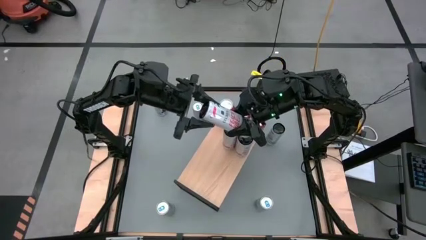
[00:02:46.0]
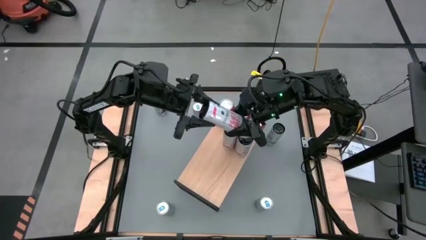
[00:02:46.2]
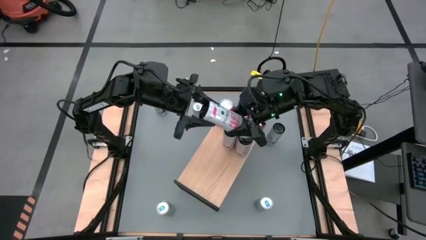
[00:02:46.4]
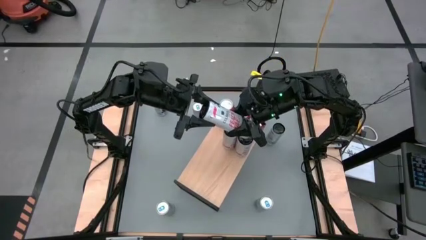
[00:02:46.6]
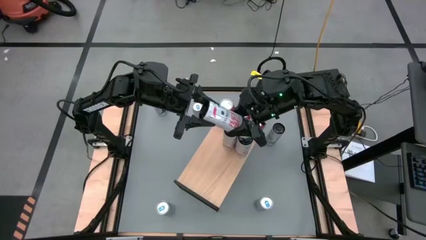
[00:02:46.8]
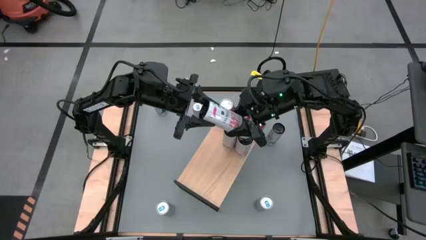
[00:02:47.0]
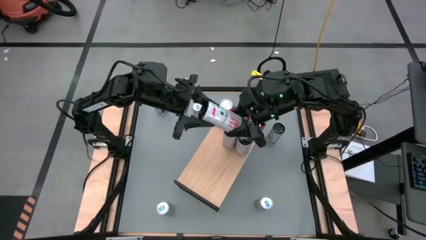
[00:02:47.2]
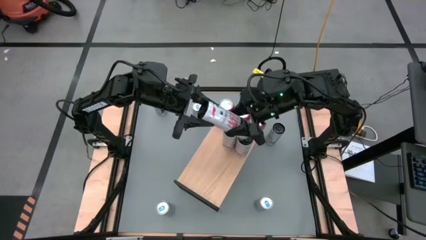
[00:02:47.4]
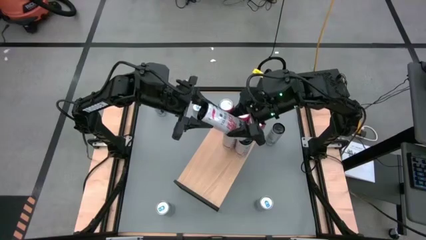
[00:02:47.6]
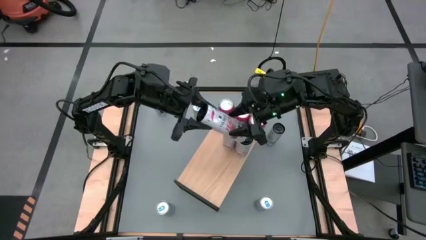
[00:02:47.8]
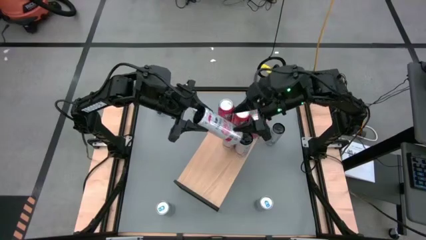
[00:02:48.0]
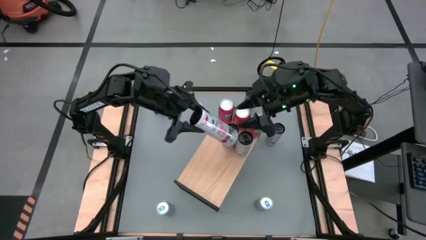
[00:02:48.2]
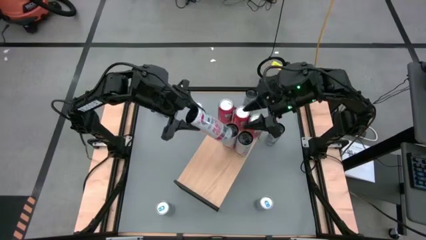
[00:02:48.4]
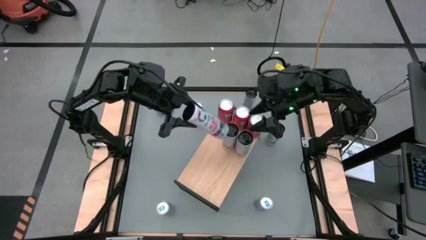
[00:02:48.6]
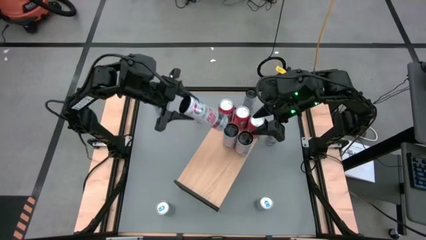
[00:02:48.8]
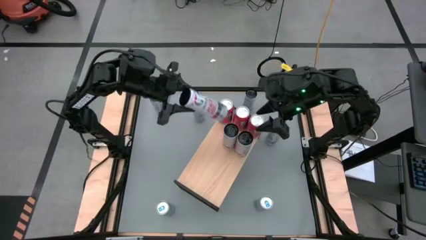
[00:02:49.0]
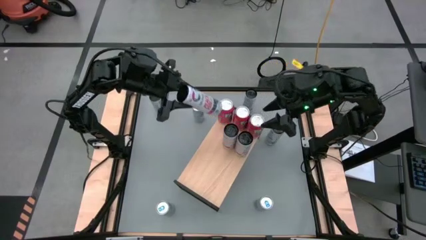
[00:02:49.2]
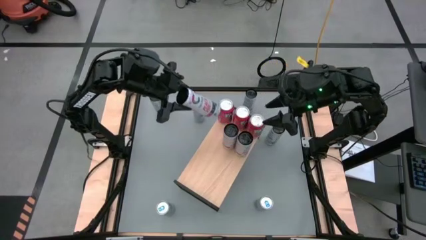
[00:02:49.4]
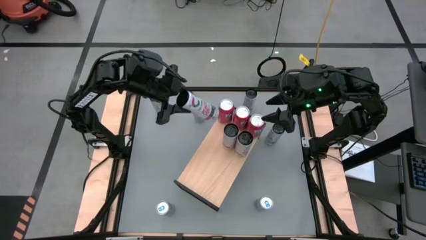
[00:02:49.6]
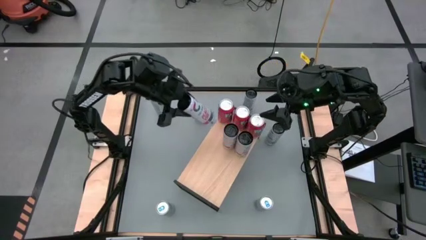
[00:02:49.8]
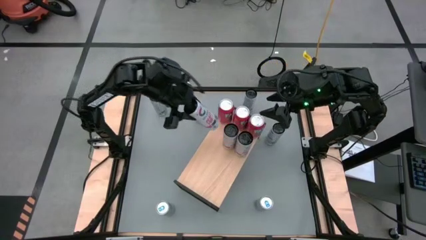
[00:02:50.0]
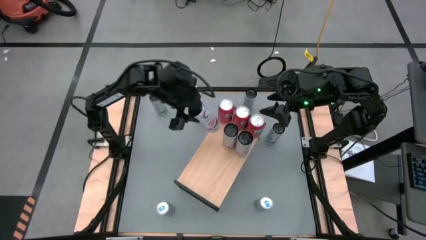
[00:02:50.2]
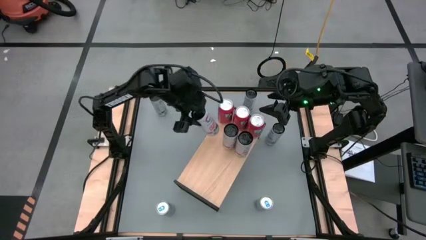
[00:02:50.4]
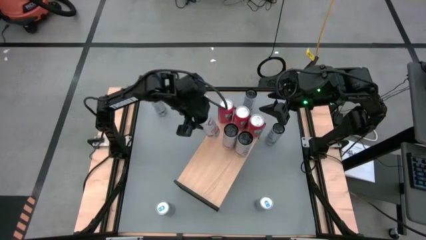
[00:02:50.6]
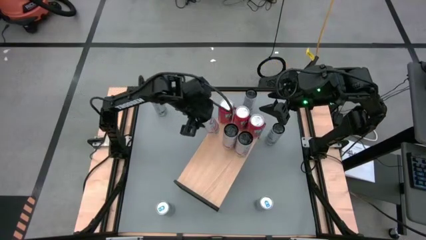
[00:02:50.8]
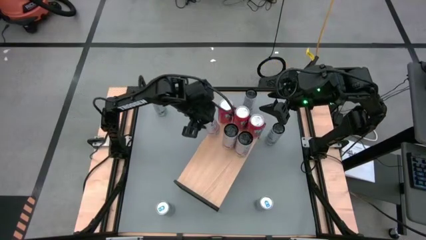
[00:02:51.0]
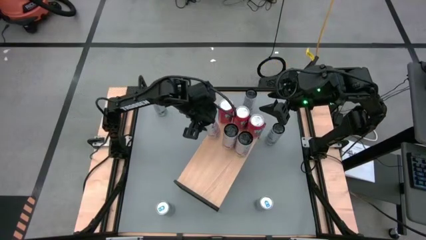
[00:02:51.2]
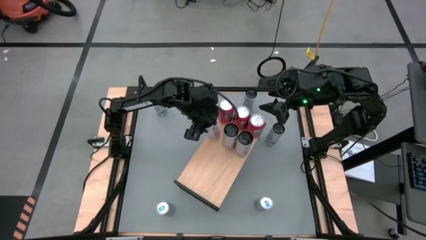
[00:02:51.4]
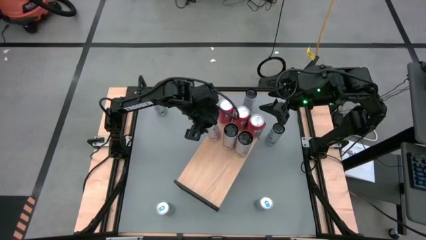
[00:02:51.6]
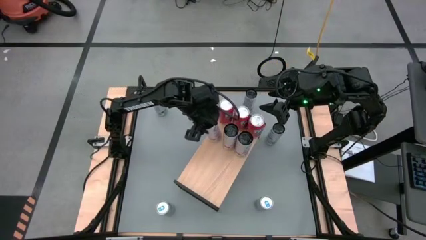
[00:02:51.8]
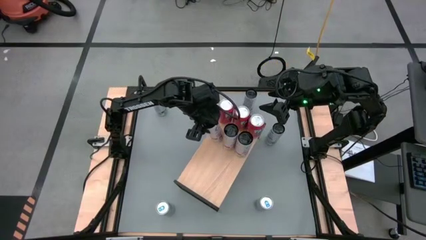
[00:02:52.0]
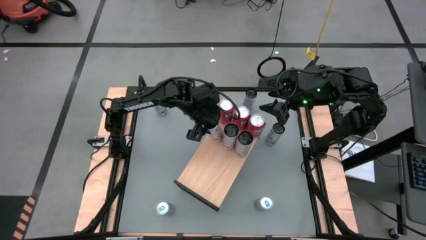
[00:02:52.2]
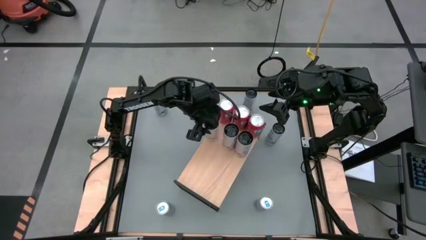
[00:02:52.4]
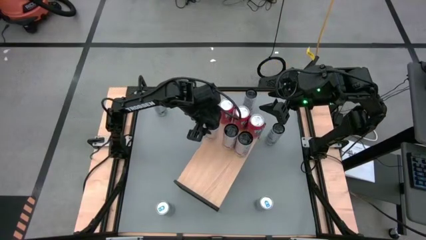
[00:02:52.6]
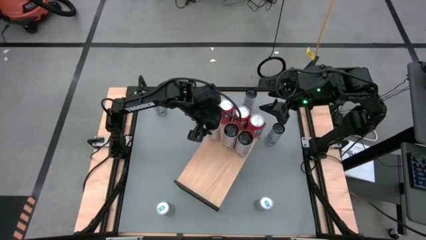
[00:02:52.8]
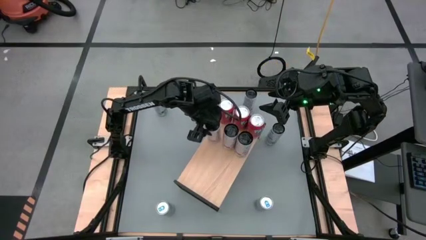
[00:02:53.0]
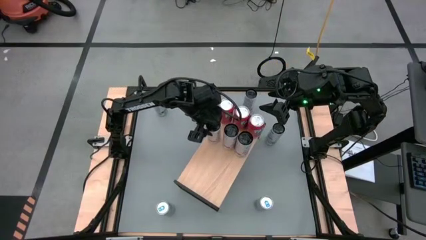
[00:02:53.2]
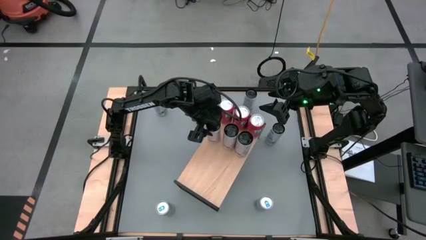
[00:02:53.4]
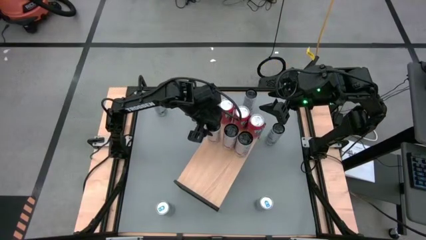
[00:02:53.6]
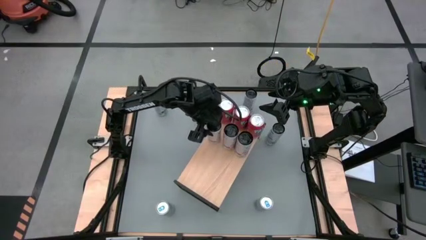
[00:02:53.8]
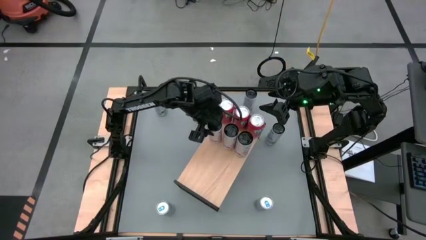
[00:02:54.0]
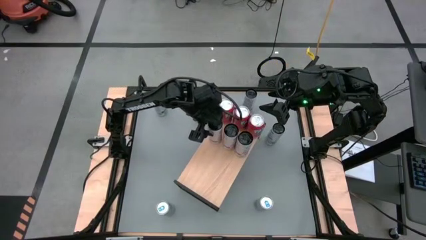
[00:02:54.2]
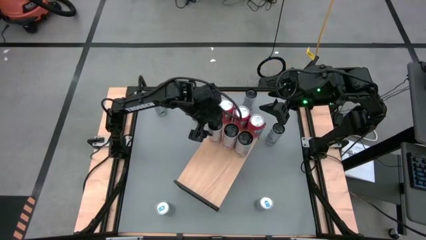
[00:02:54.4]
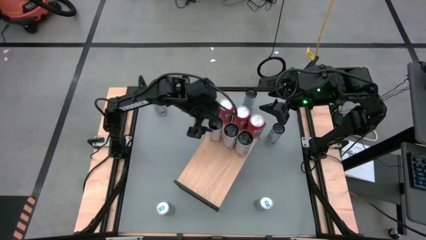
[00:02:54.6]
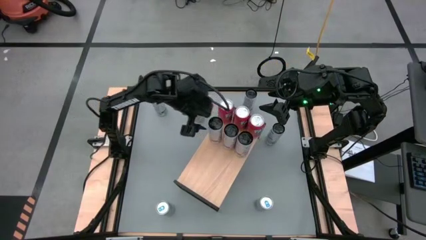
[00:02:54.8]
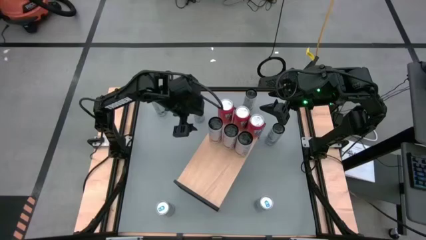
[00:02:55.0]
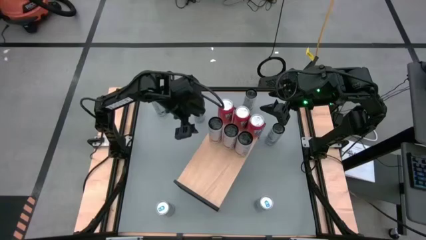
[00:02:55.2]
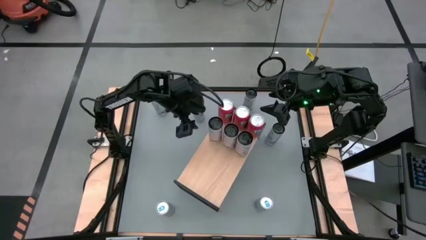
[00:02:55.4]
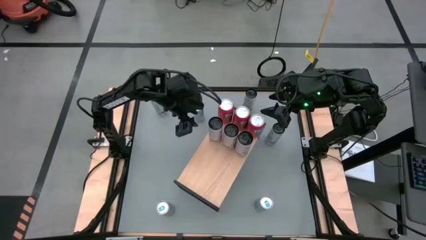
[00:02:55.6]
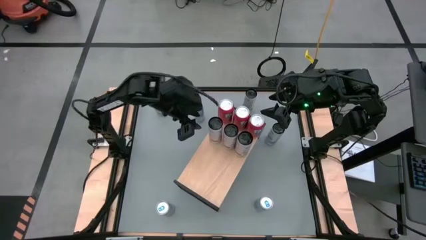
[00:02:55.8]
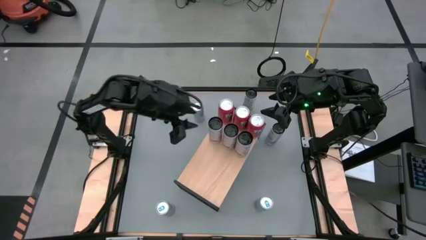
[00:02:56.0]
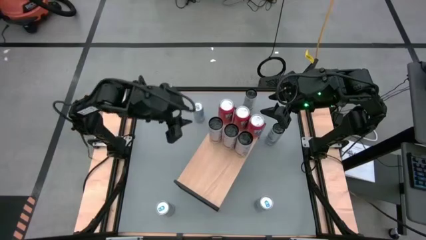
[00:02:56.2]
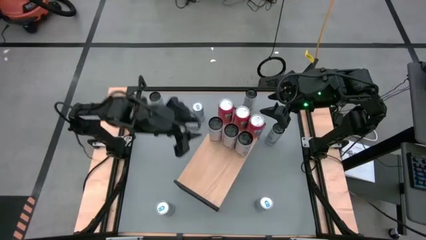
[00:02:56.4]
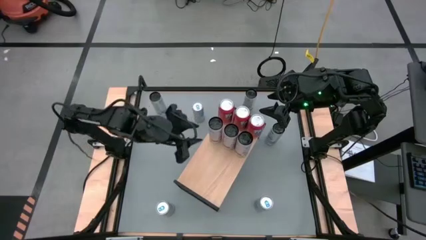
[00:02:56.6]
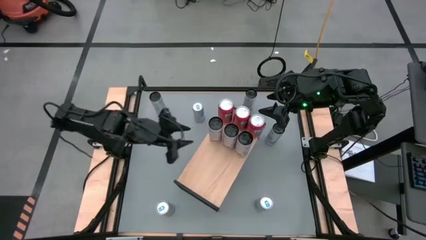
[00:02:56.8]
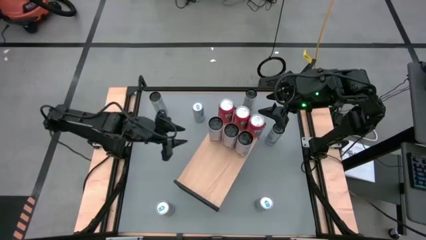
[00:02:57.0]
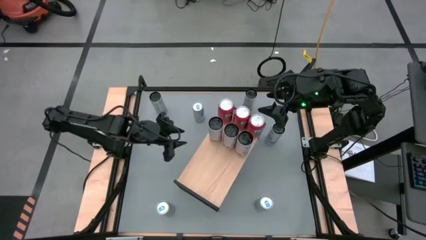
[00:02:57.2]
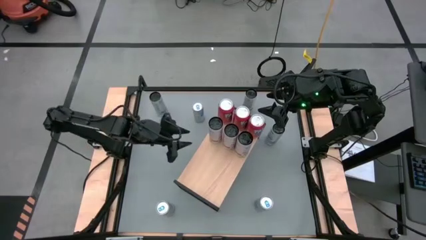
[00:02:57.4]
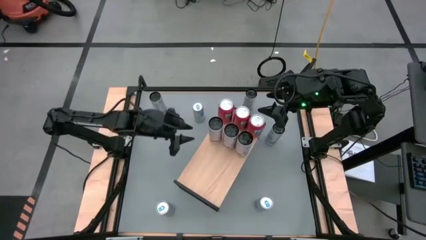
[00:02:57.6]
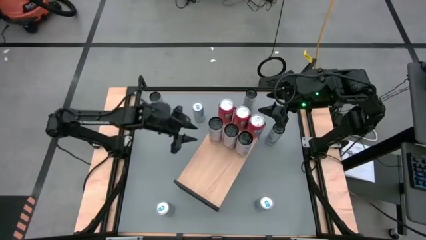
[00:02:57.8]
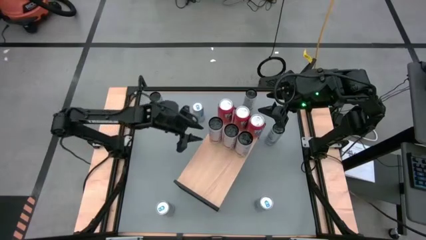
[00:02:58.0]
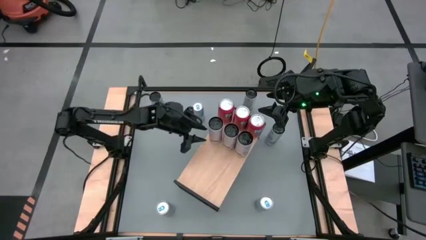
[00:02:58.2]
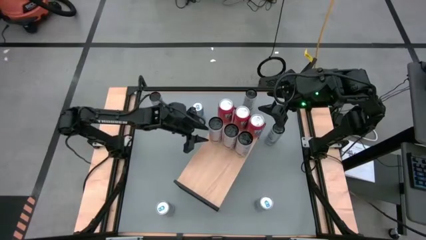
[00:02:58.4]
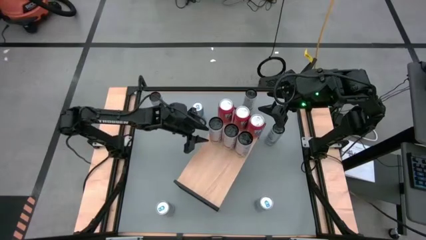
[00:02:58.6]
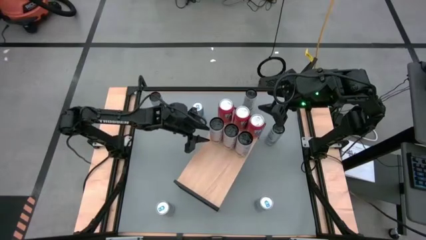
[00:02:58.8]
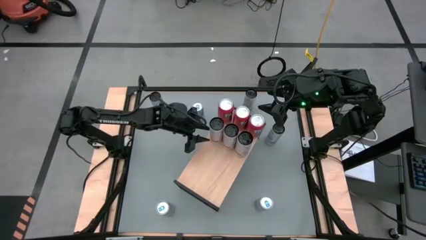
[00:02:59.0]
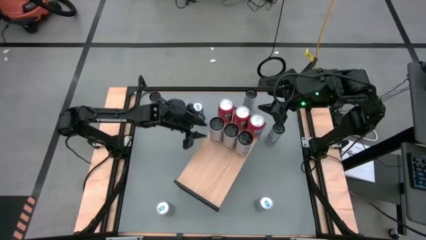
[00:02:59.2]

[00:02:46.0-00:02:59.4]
Task: Place canned beverage on shelf
Put the white pink soda can on the shelf aligned with the other white pink soda cans

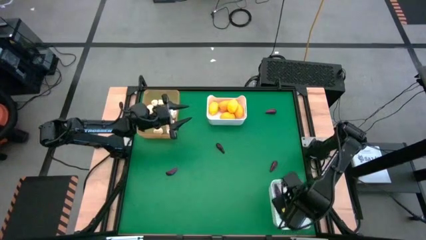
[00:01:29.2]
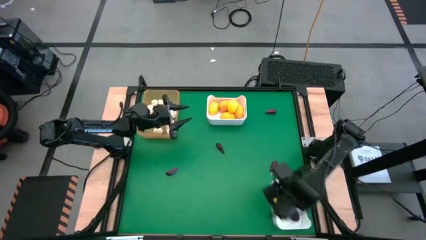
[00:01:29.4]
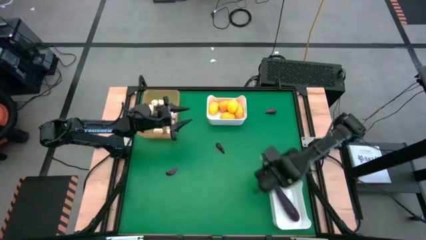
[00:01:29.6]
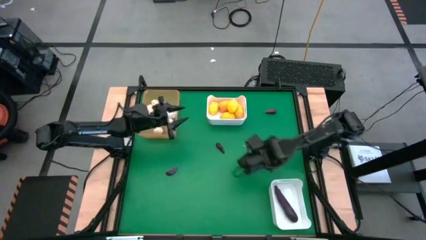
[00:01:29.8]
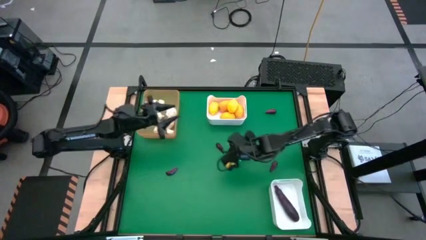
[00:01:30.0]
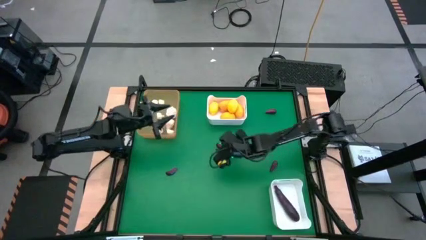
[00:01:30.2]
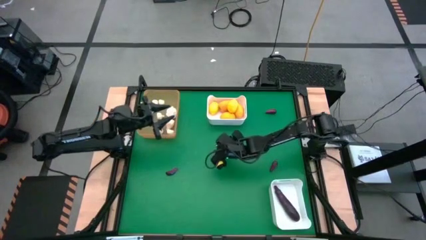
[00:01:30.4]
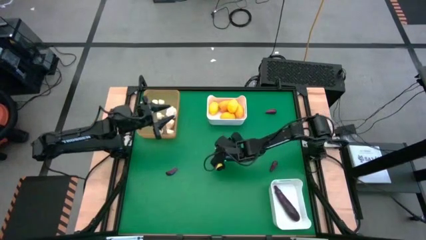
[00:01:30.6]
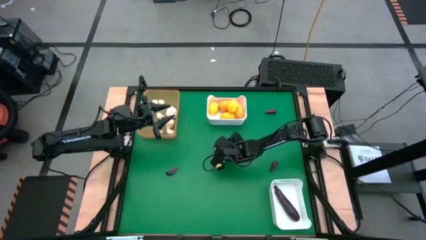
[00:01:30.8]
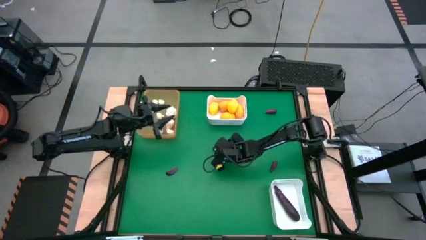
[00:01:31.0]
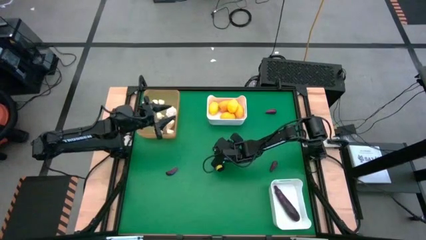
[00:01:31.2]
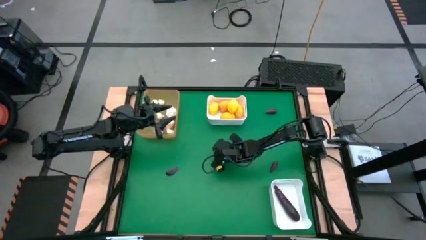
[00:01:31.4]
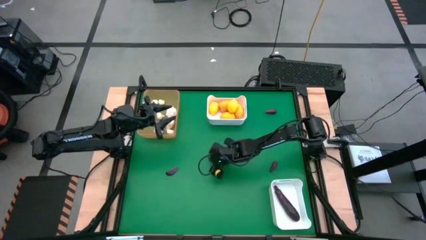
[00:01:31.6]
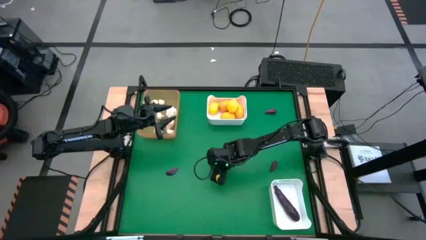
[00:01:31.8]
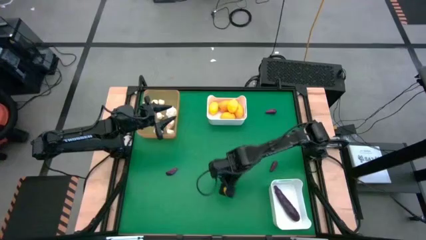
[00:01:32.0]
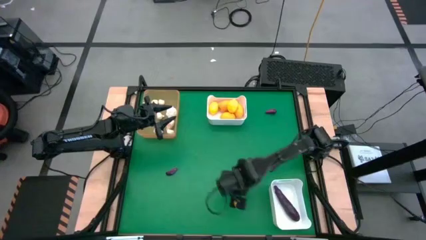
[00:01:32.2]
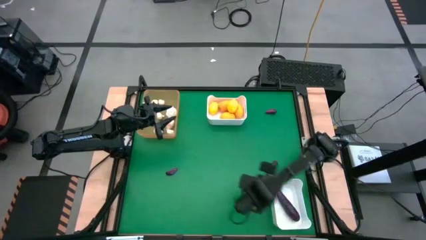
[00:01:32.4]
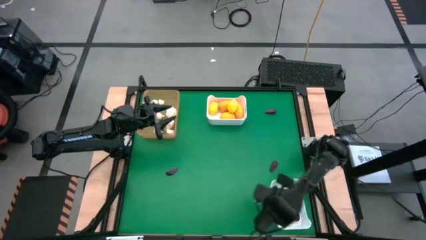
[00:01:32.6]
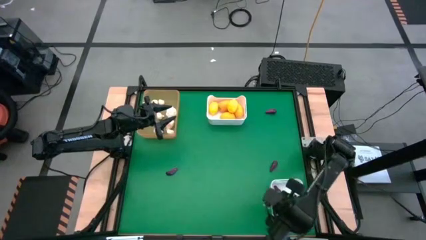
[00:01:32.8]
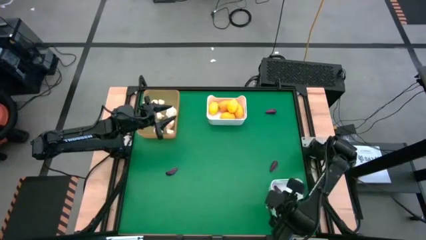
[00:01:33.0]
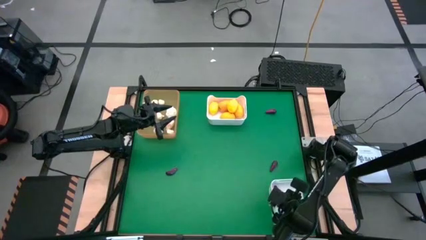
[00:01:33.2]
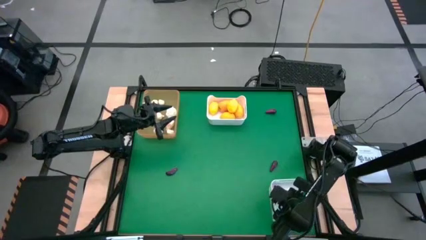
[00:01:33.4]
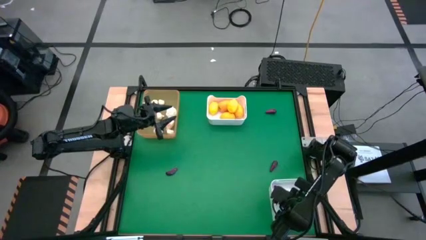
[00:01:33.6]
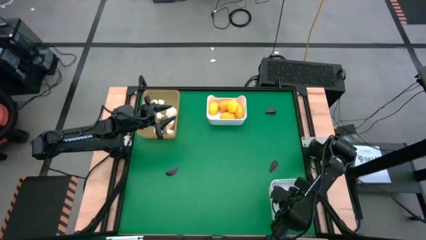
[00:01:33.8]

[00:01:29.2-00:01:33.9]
Task: Sort produce into baskets
Put the eggplant into the bottom white bin
